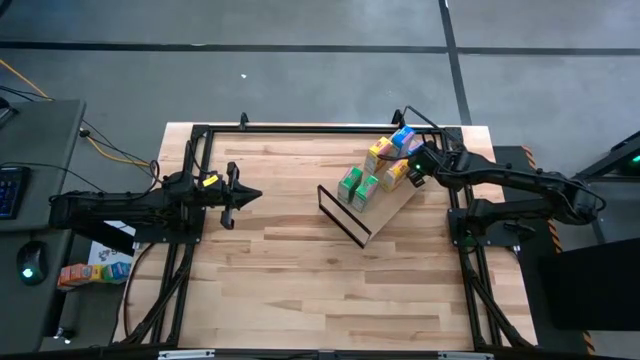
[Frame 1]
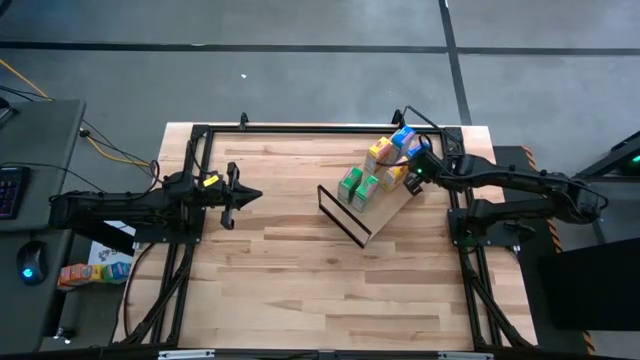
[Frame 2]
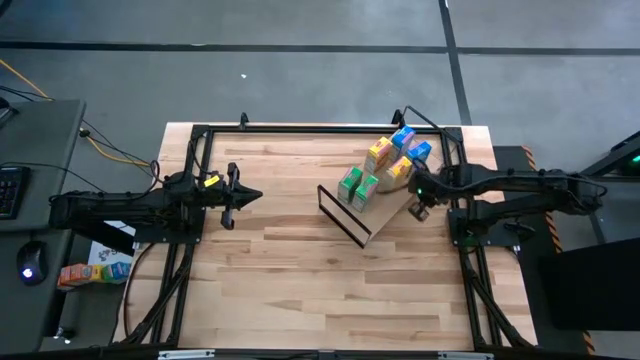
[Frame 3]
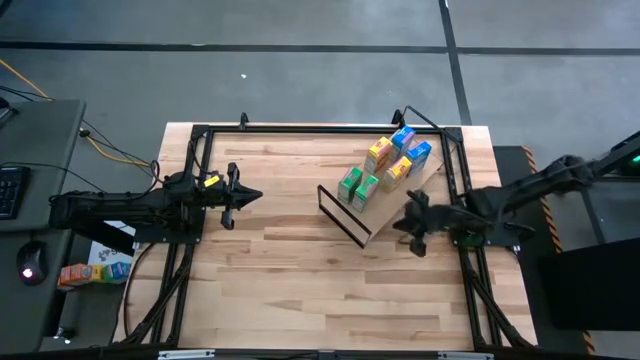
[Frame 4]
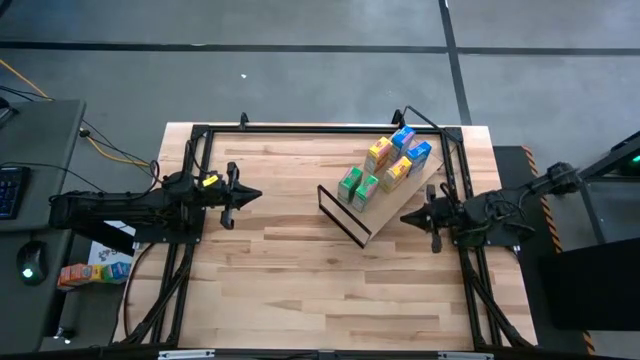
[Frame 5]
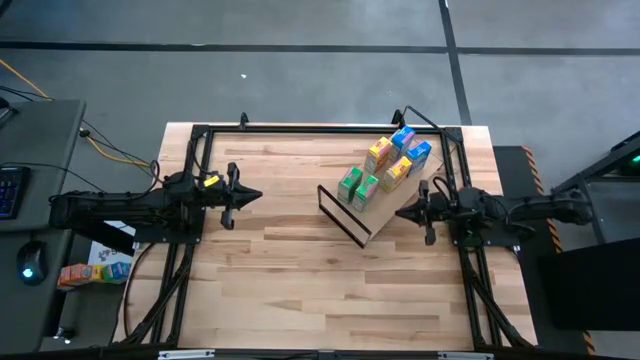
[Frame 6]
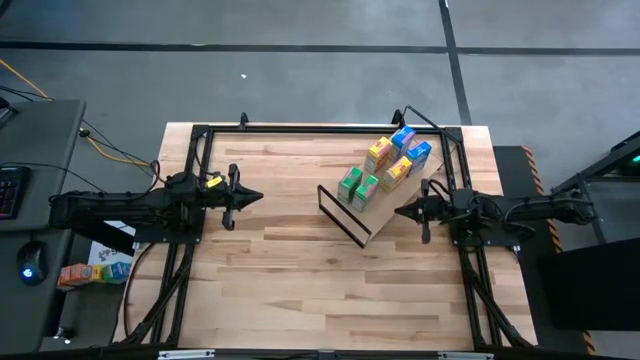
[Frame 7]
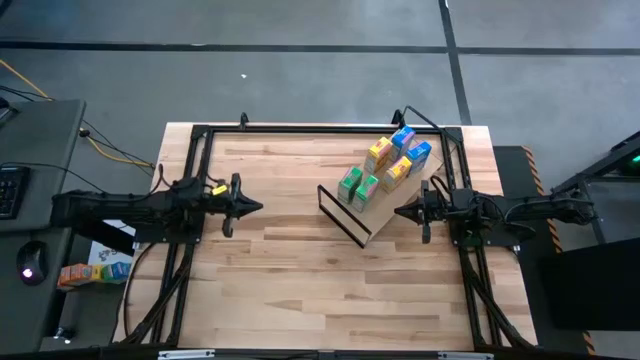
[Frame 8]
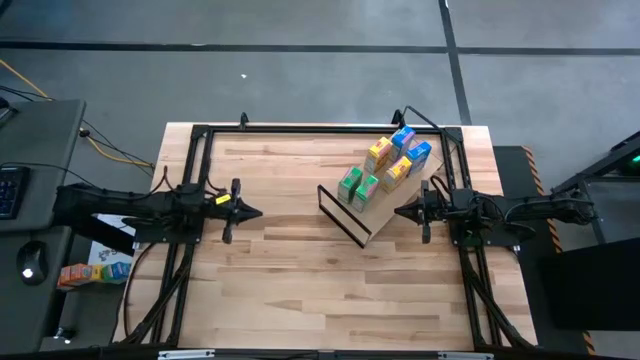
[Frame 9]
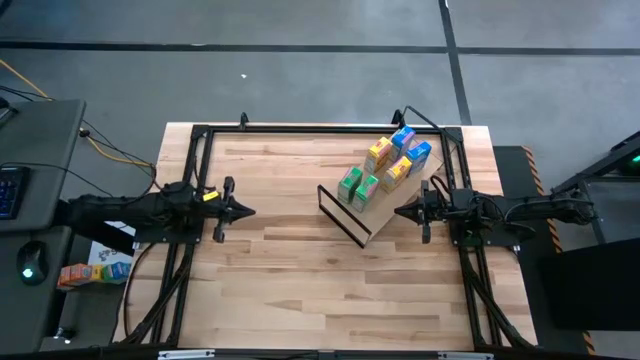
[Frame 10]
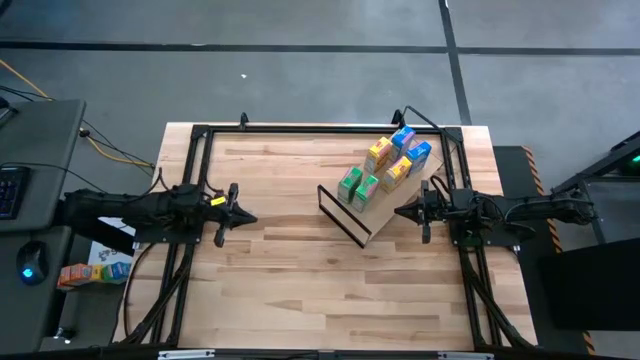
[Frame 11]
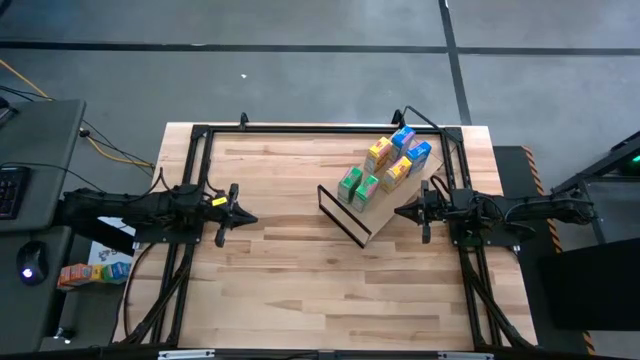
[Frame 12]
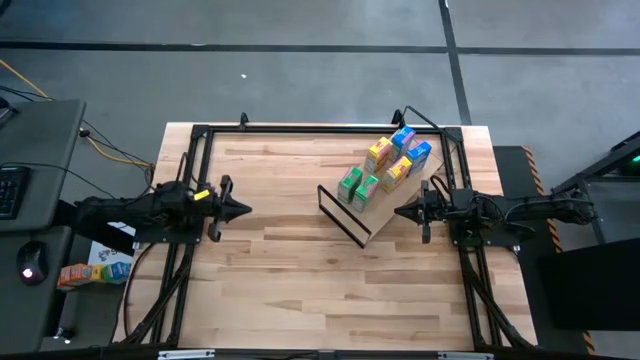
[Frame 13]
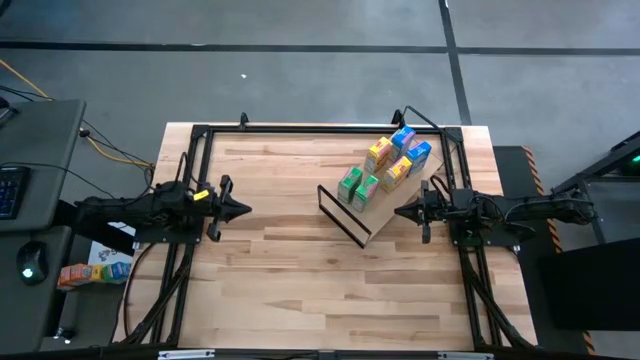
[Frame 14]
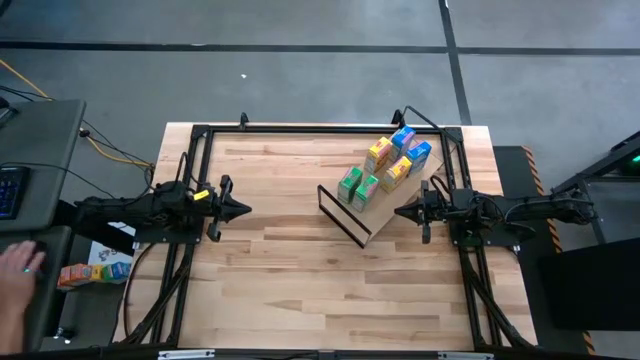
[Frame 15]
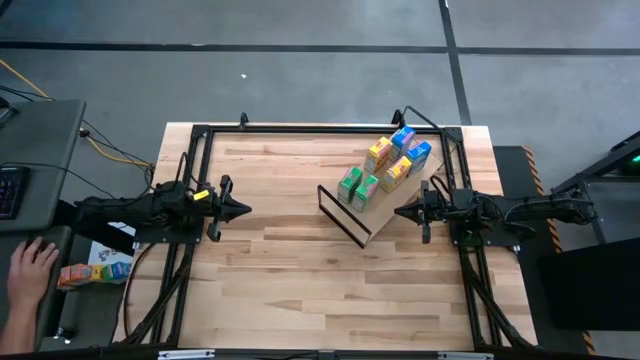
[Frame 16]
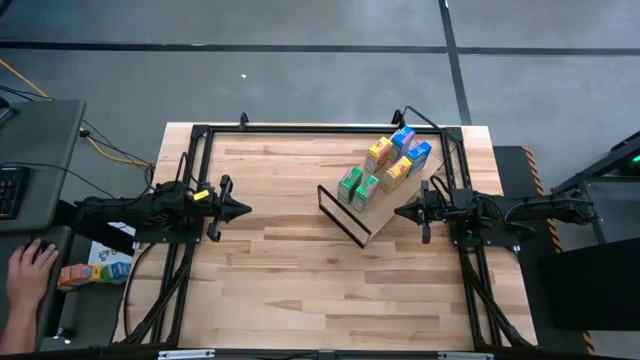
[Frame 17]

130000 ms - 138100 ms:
Task: Stack cereal on shelf
Return to Home Position

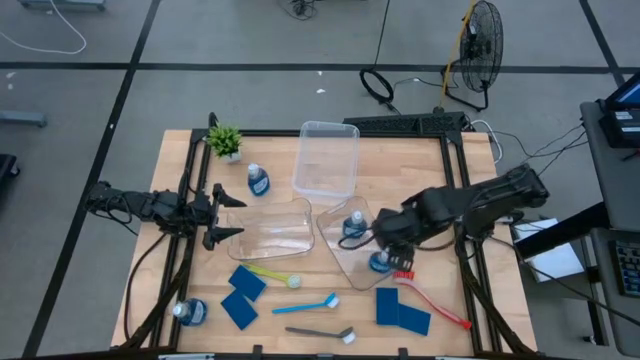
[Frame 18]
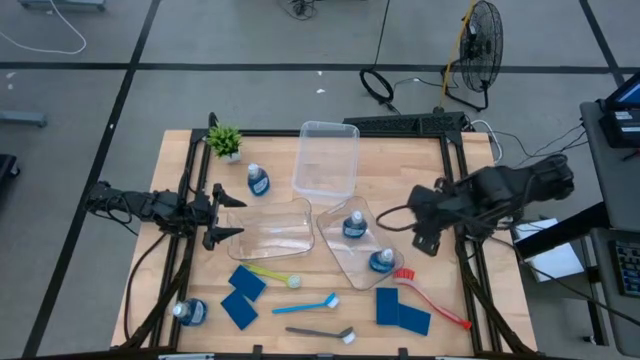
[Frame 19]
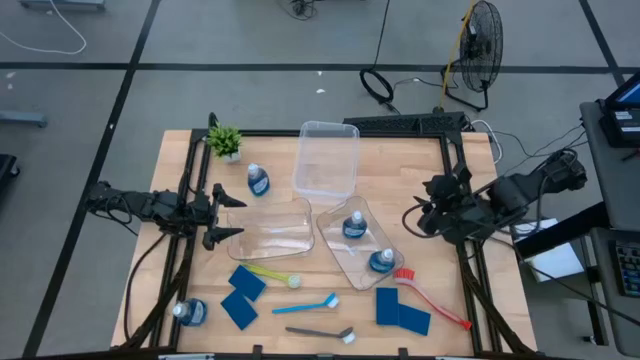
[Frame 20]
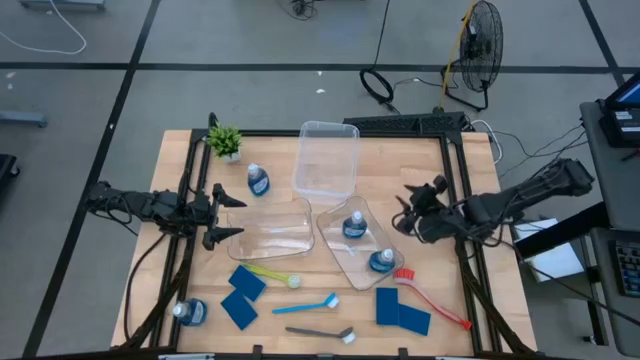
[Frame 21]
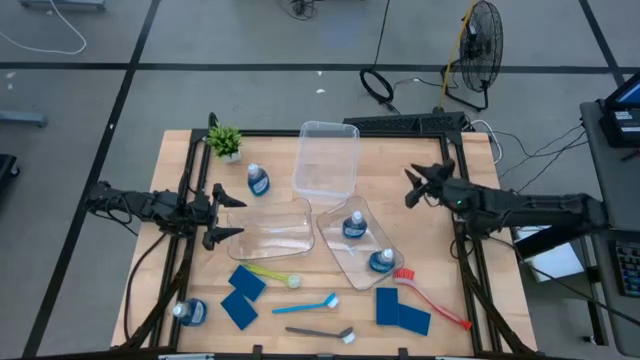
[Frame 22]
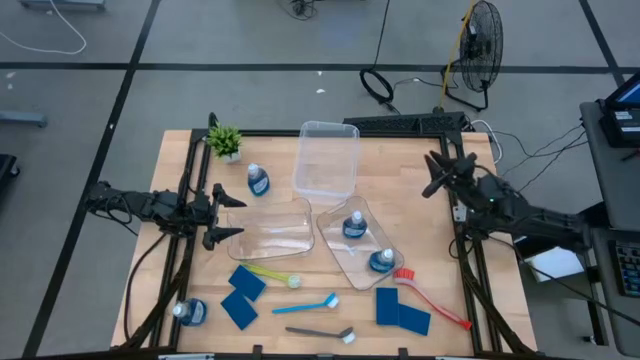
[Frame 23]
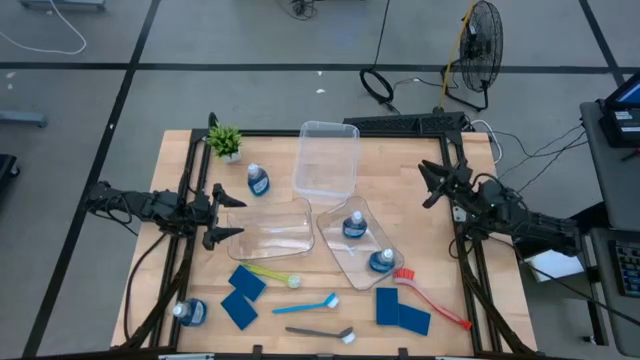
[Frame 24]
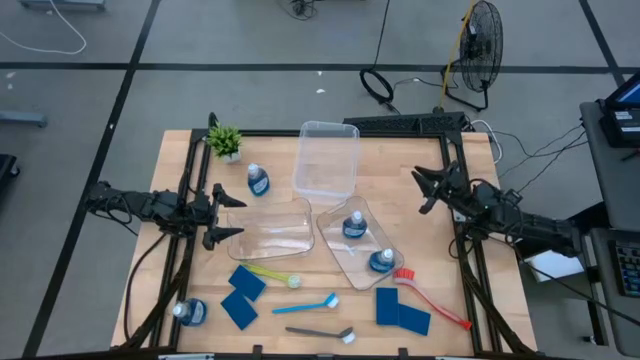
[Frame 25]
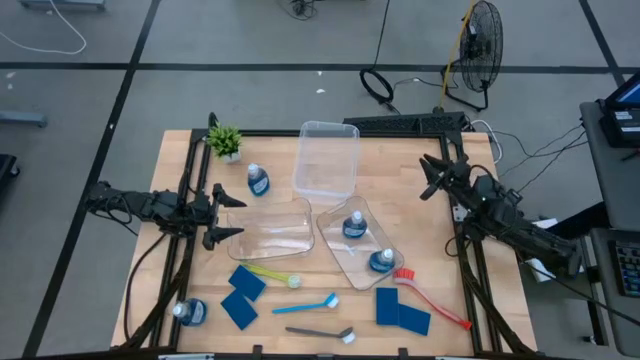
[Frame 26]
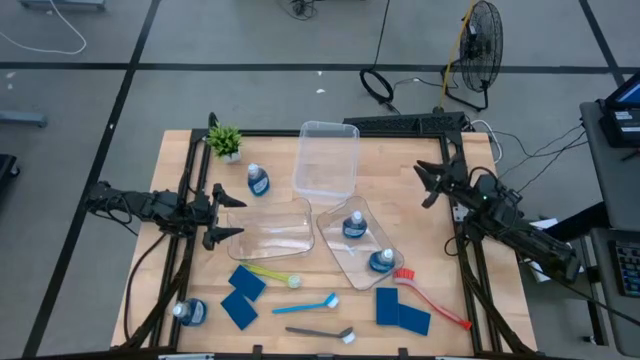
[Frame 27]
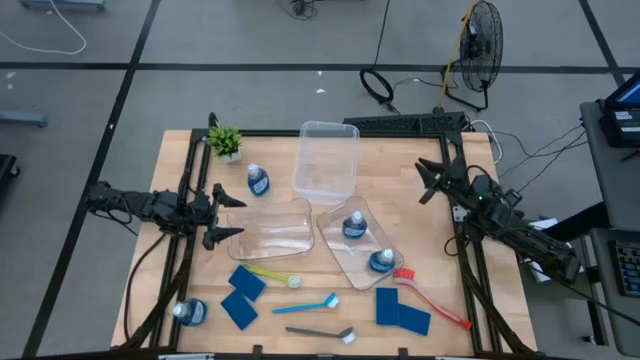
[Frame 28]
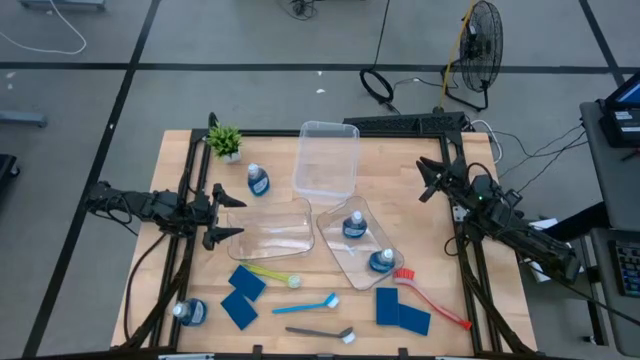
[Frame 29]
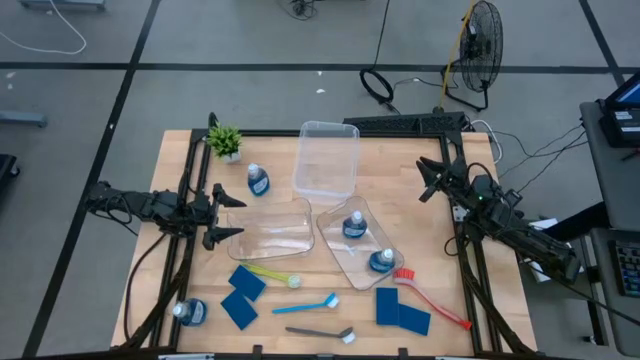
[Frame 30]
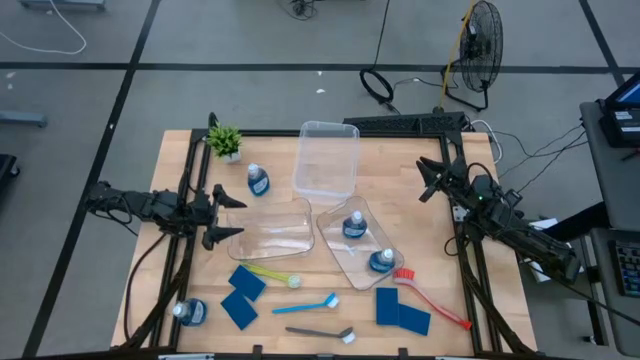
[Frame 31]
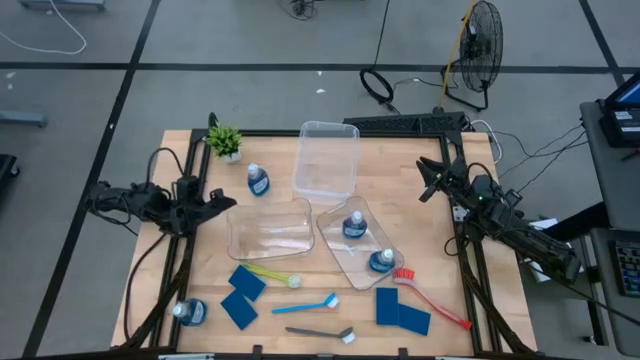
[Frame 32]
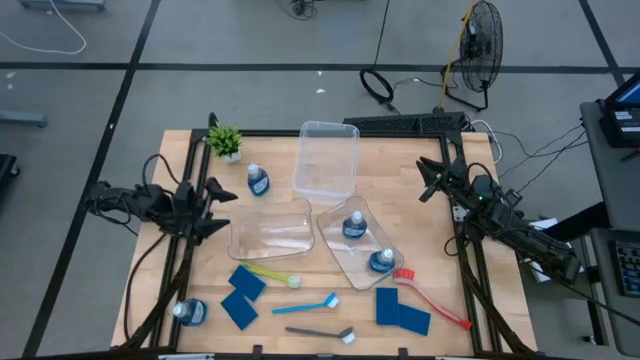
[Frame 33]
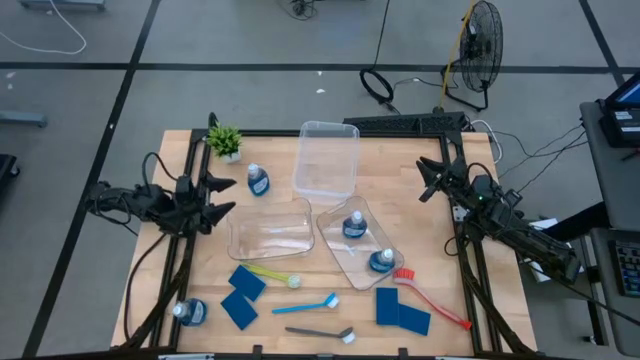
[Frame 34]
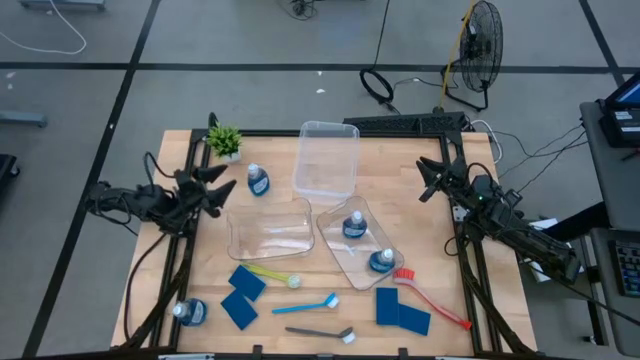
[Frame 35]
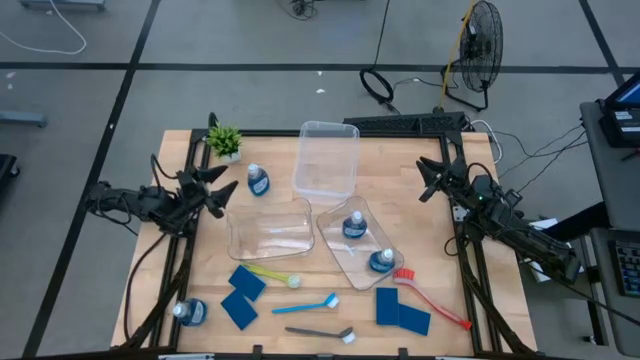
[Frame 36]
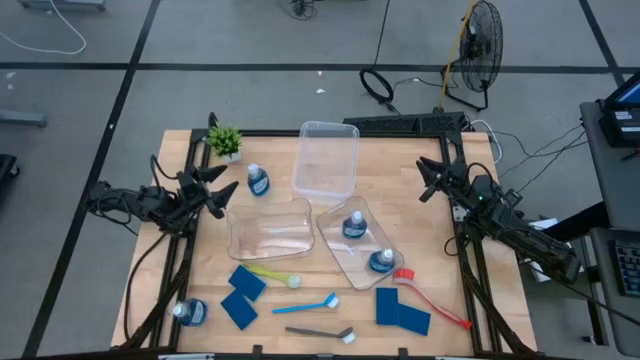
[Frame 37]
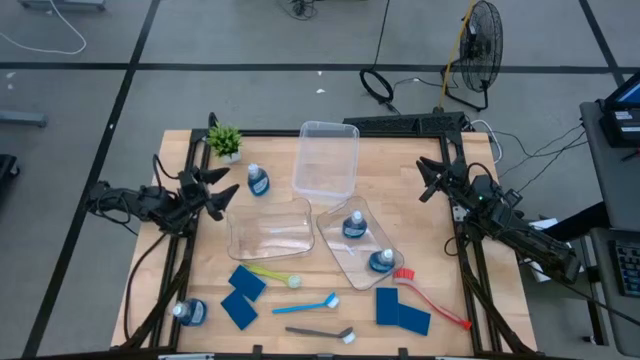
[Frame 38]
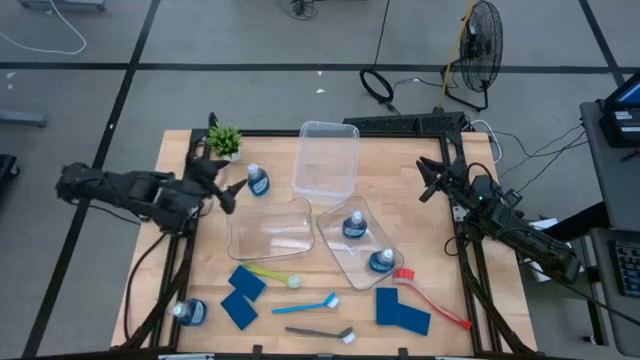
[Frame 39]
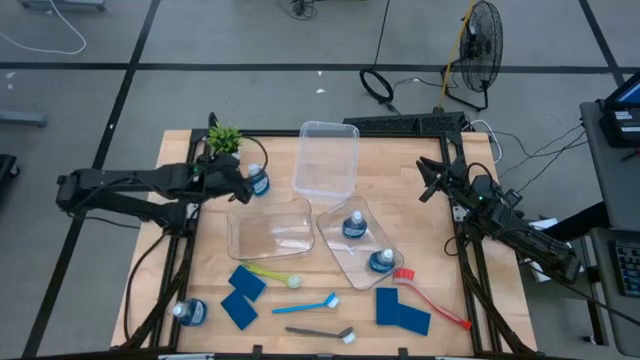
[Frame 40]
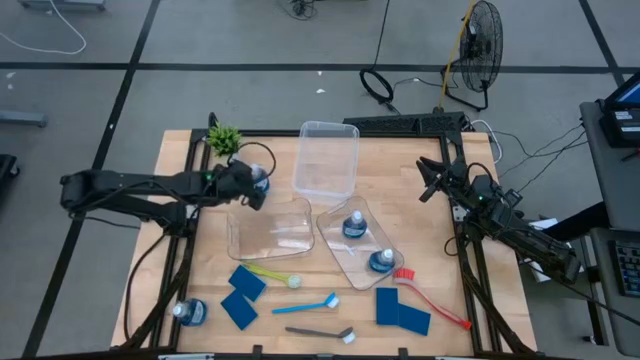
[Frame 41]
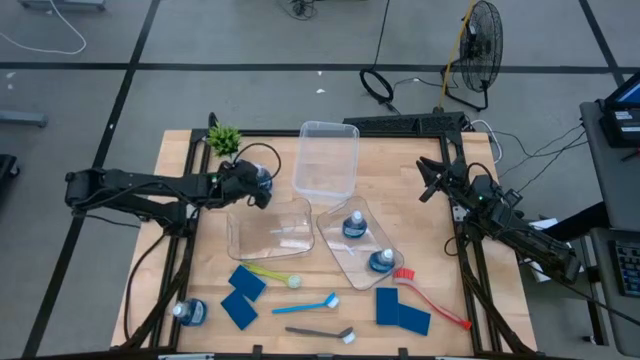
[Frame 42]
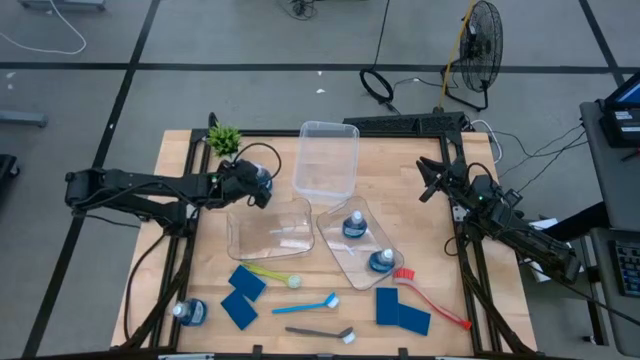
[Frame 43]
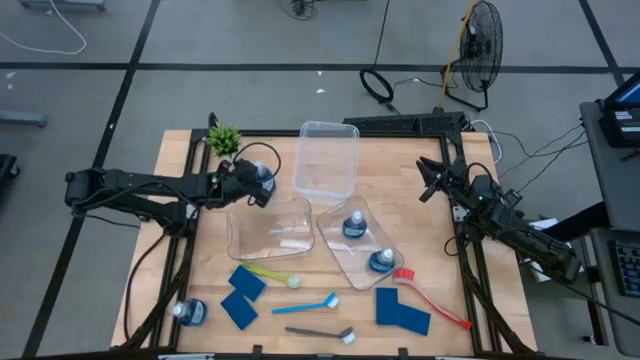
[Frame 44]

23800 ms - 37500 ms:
Task: Pick & Place Kitchen Sink Supplies
Put the blue soap dispenser into the right transparent bin
